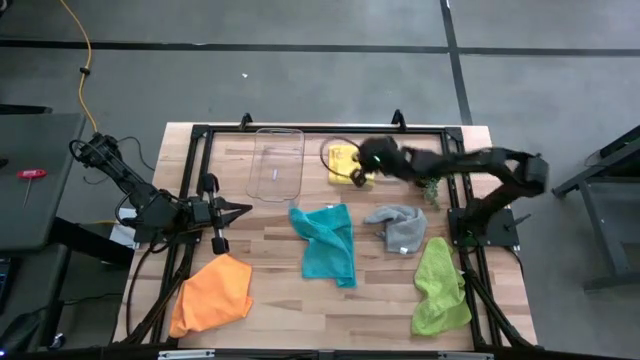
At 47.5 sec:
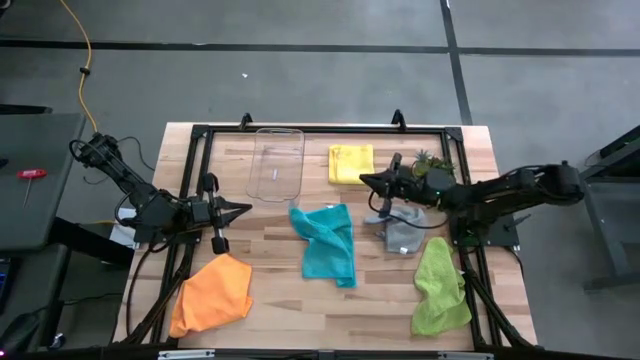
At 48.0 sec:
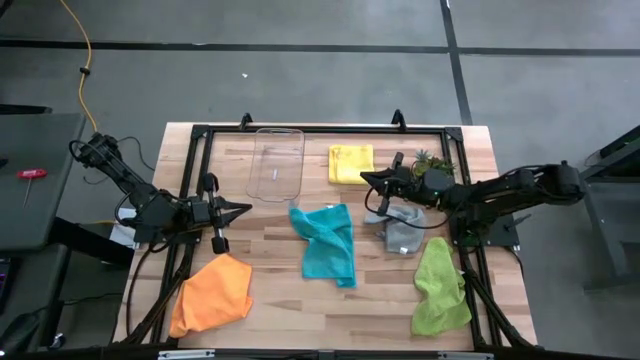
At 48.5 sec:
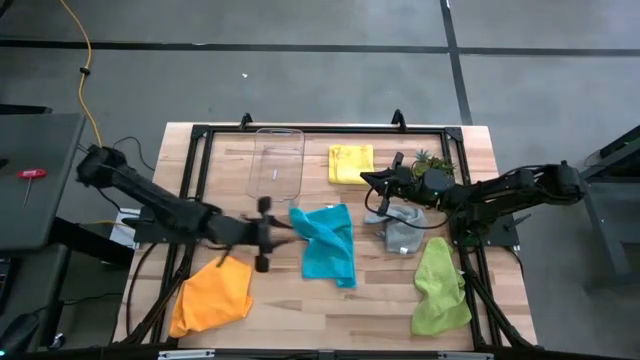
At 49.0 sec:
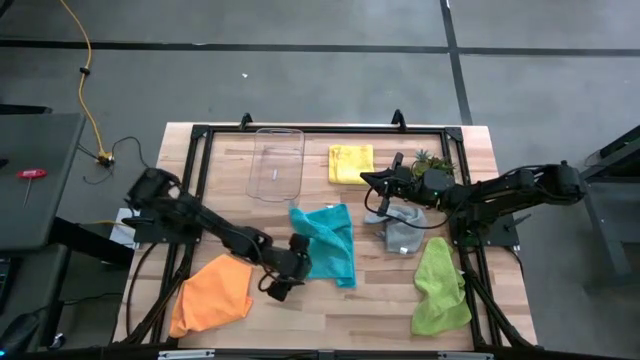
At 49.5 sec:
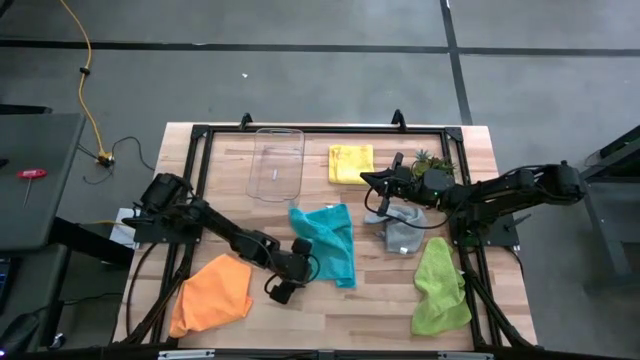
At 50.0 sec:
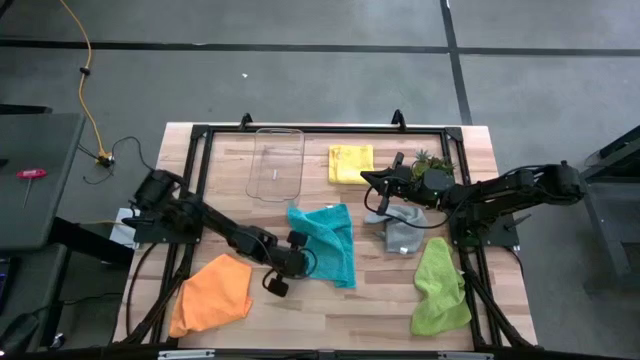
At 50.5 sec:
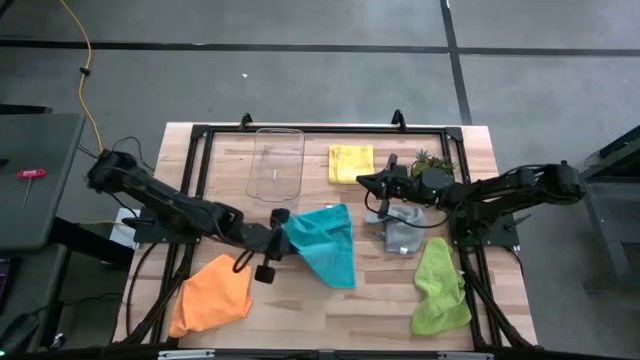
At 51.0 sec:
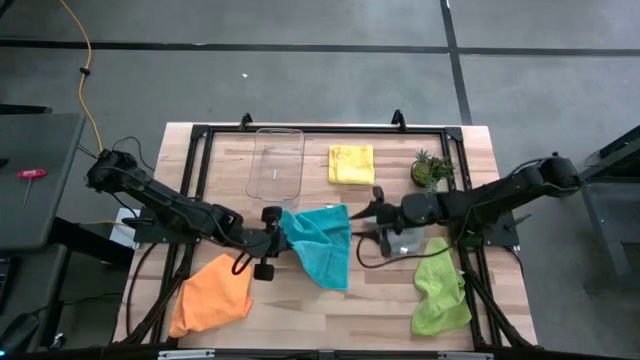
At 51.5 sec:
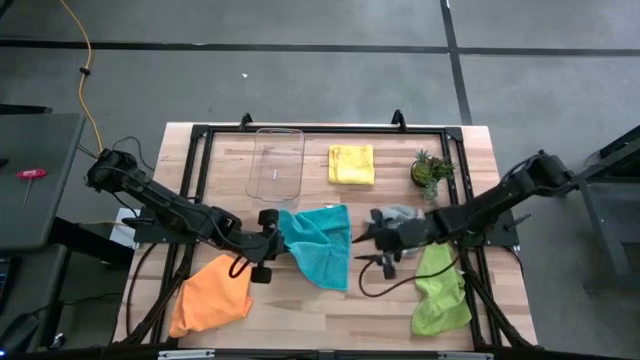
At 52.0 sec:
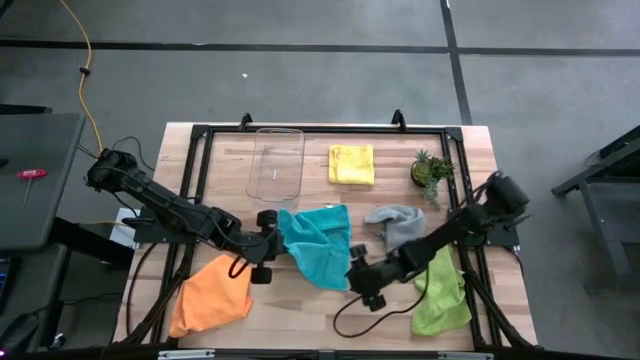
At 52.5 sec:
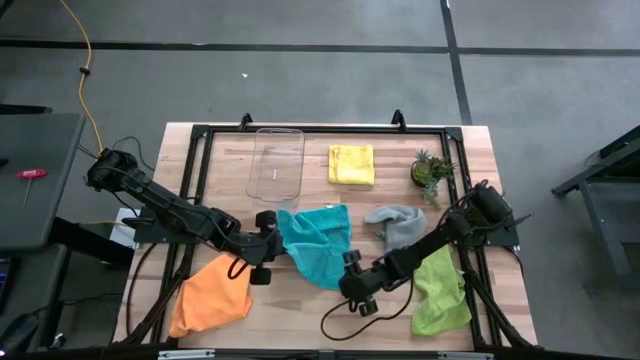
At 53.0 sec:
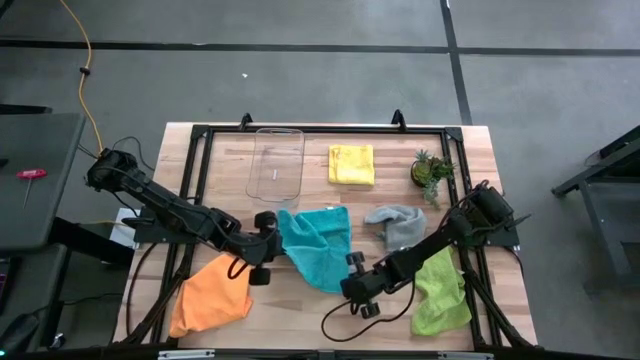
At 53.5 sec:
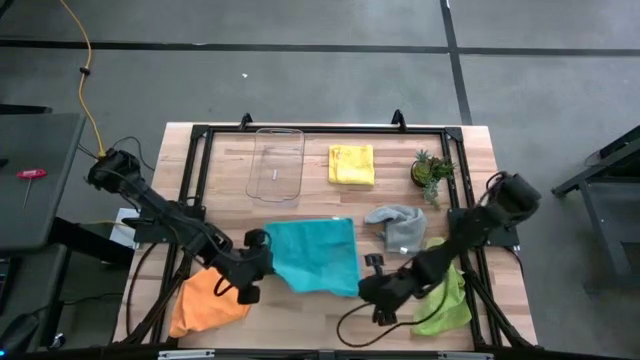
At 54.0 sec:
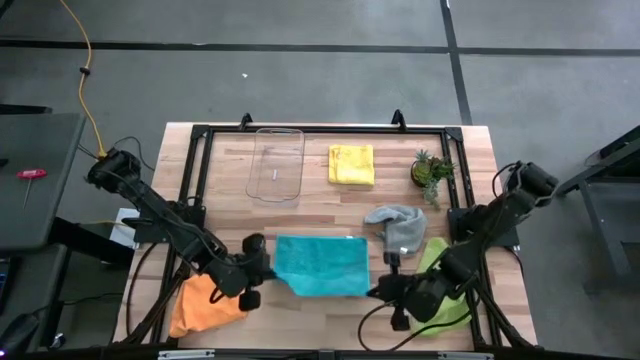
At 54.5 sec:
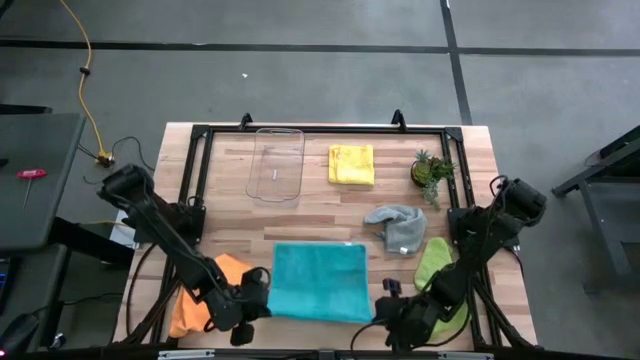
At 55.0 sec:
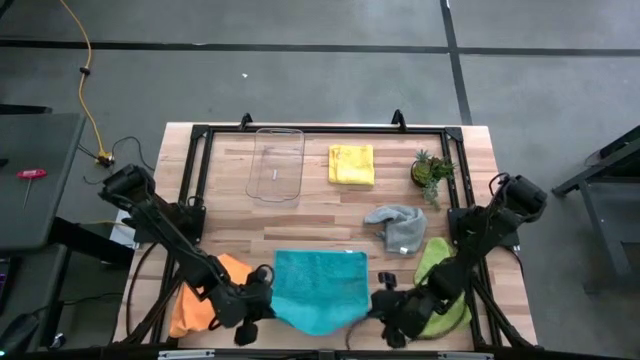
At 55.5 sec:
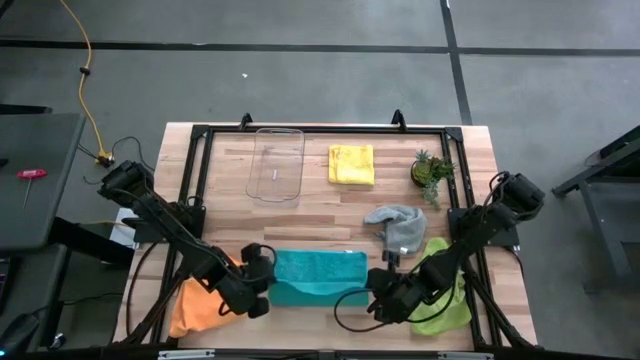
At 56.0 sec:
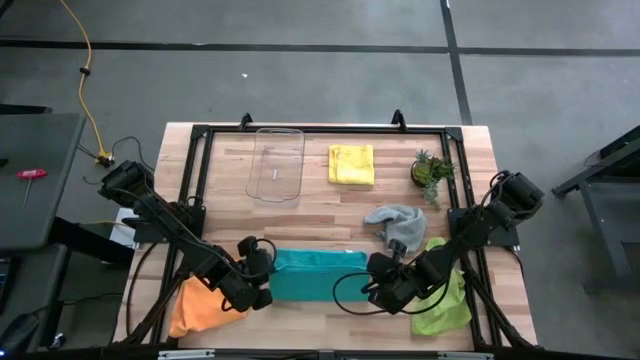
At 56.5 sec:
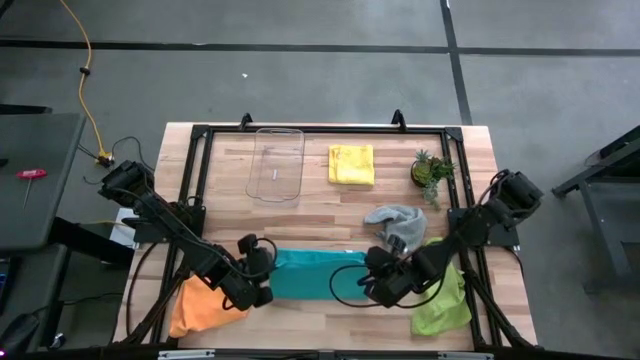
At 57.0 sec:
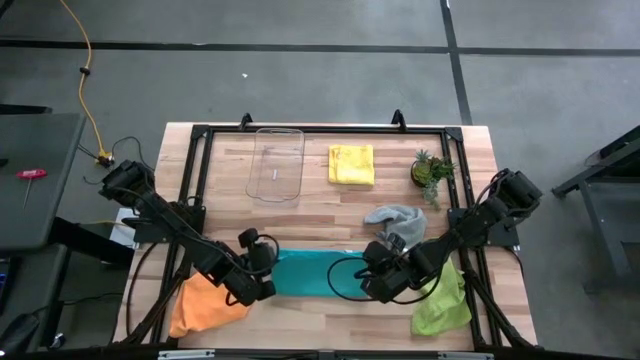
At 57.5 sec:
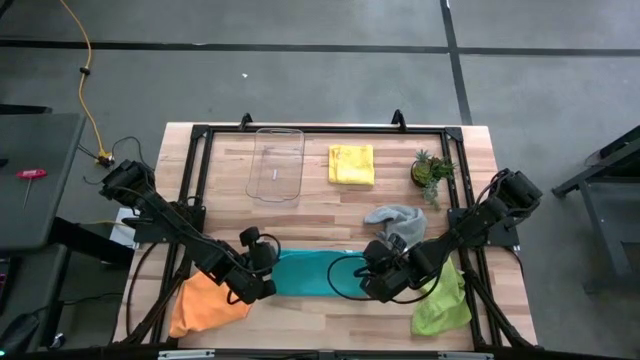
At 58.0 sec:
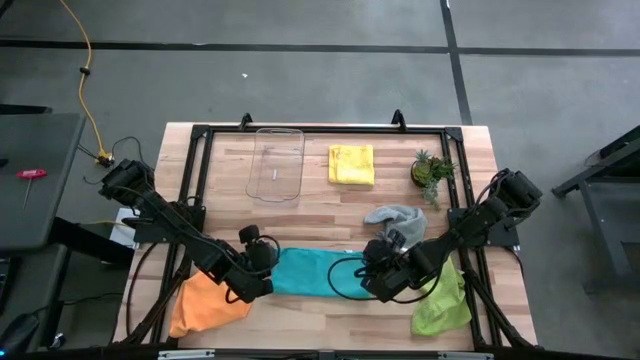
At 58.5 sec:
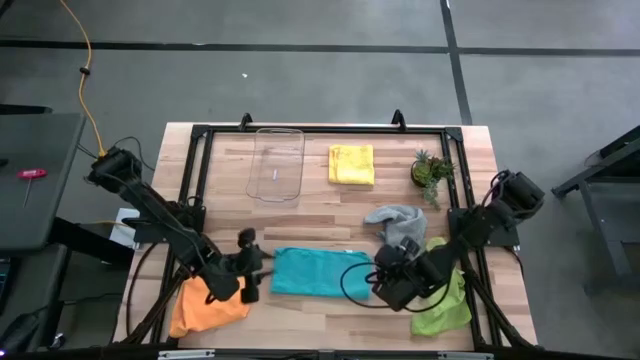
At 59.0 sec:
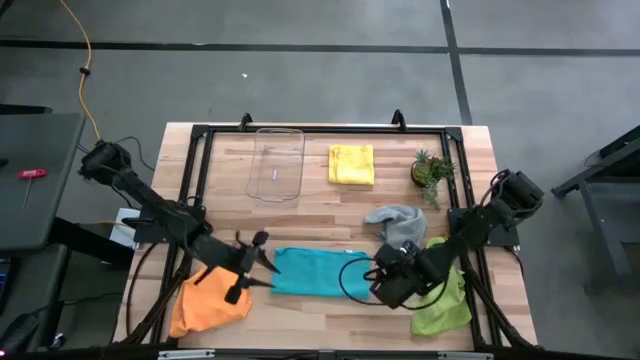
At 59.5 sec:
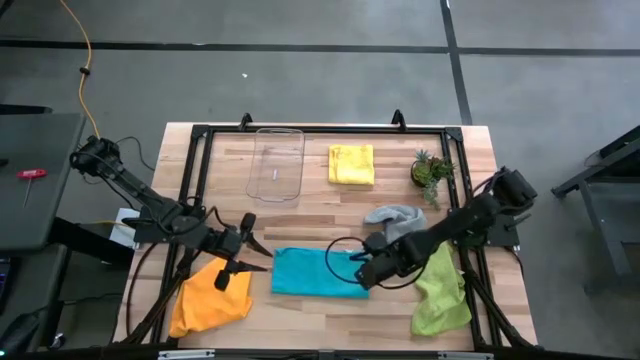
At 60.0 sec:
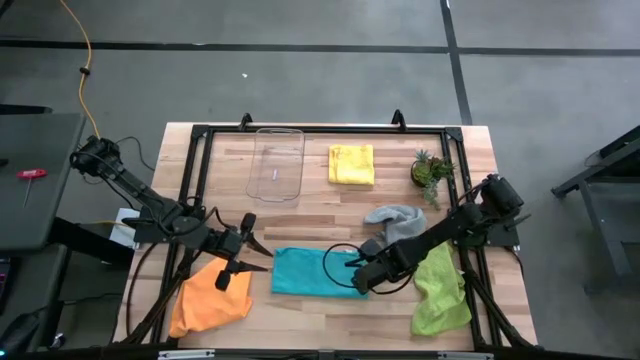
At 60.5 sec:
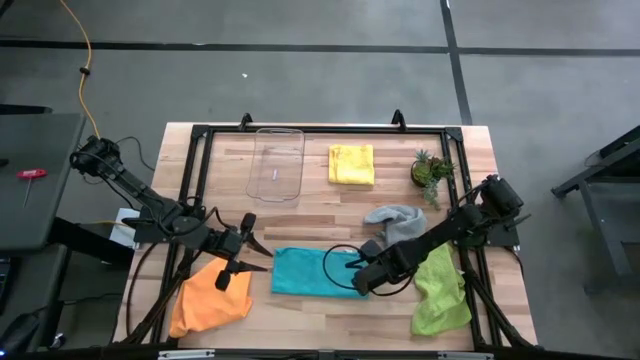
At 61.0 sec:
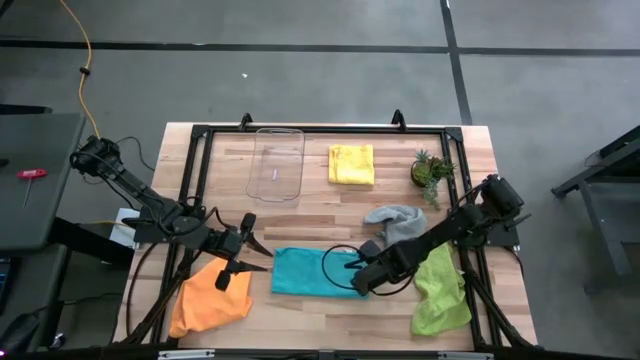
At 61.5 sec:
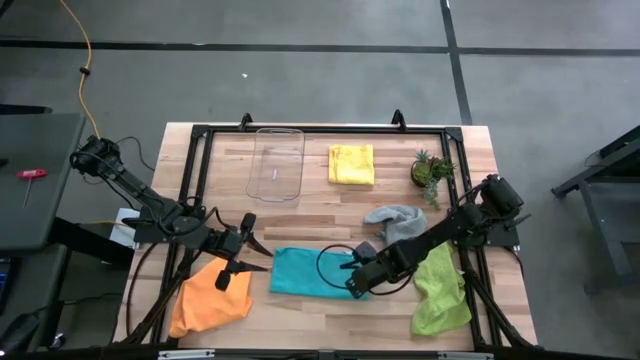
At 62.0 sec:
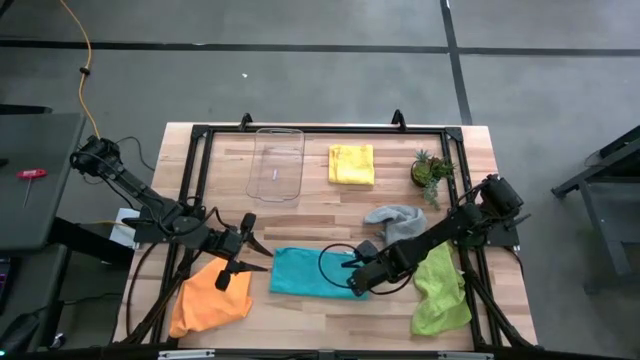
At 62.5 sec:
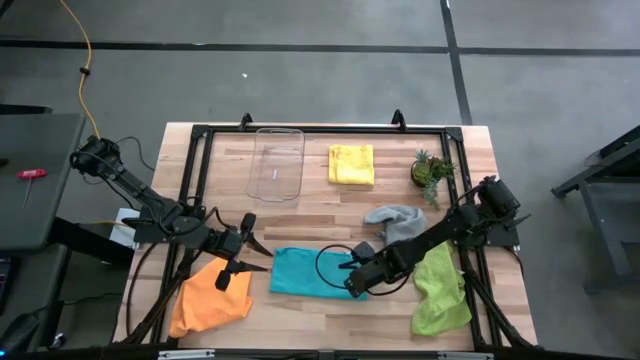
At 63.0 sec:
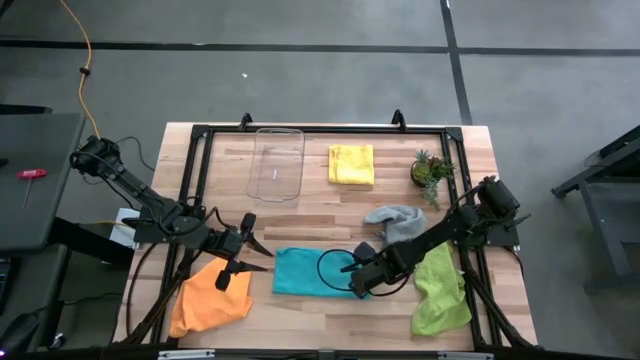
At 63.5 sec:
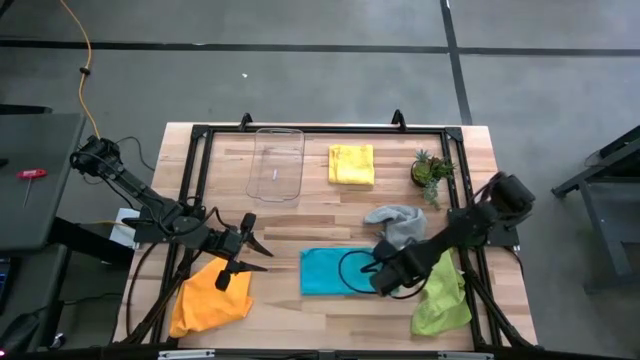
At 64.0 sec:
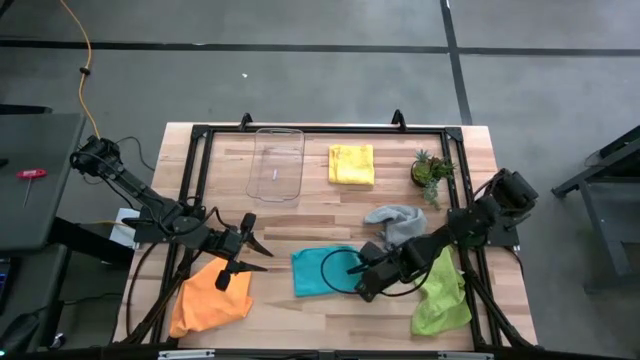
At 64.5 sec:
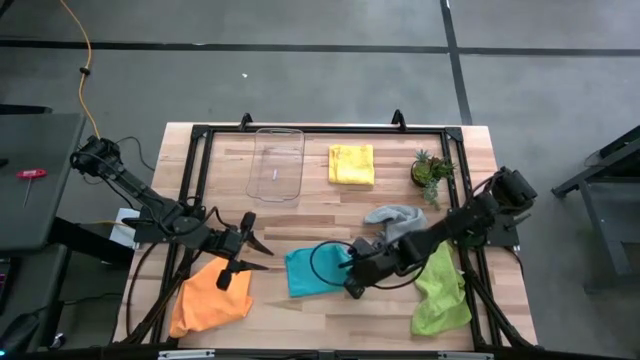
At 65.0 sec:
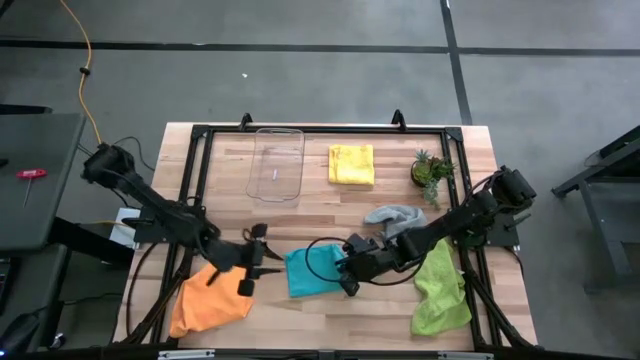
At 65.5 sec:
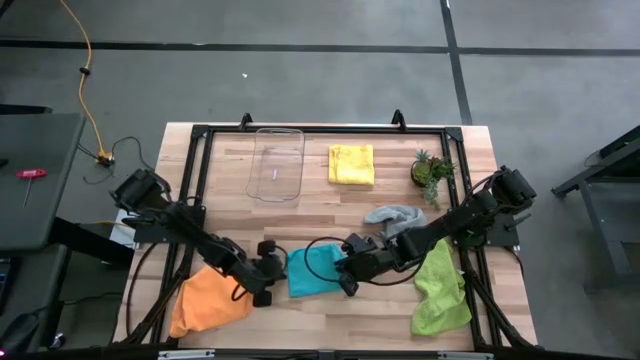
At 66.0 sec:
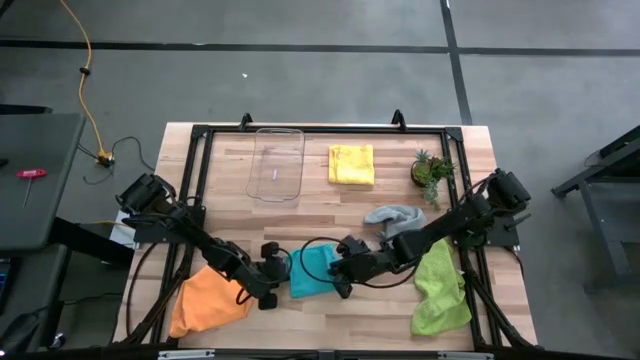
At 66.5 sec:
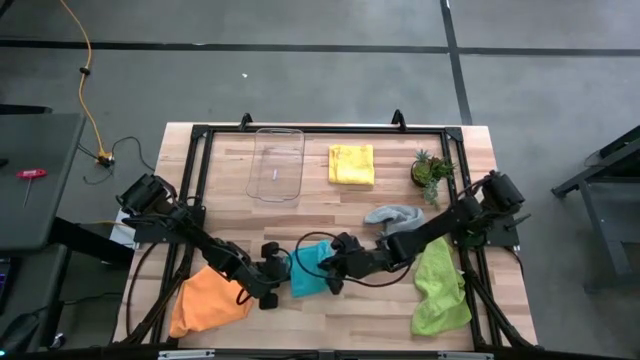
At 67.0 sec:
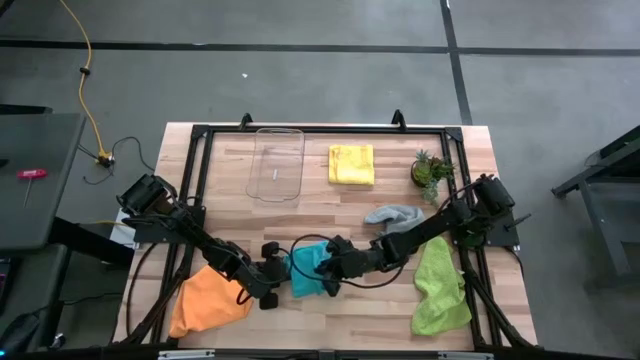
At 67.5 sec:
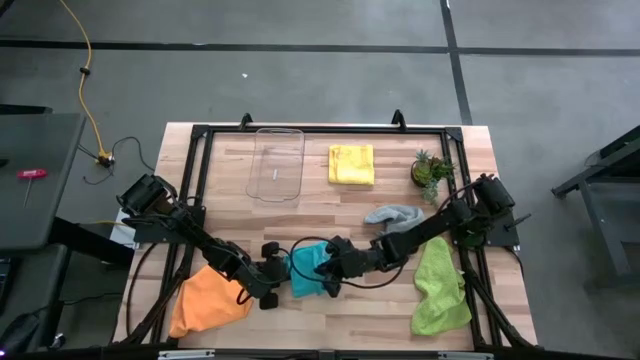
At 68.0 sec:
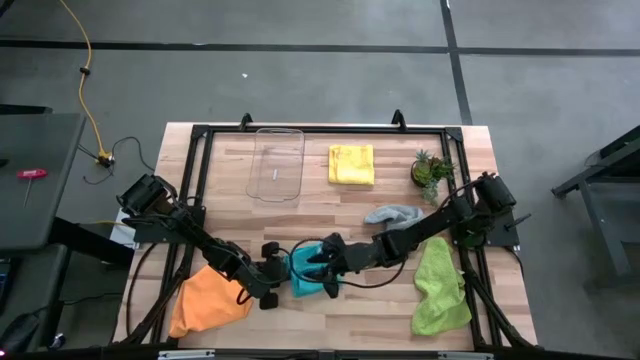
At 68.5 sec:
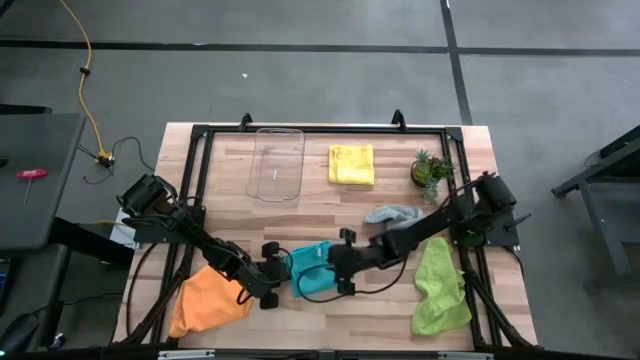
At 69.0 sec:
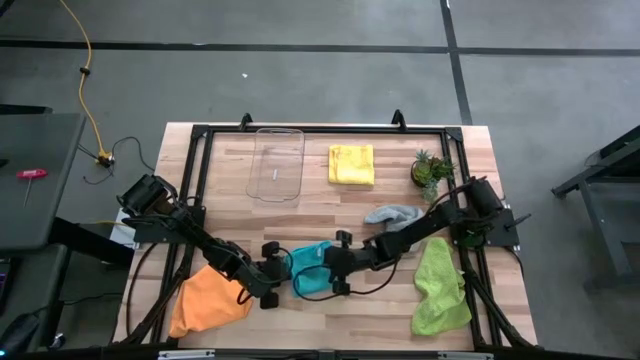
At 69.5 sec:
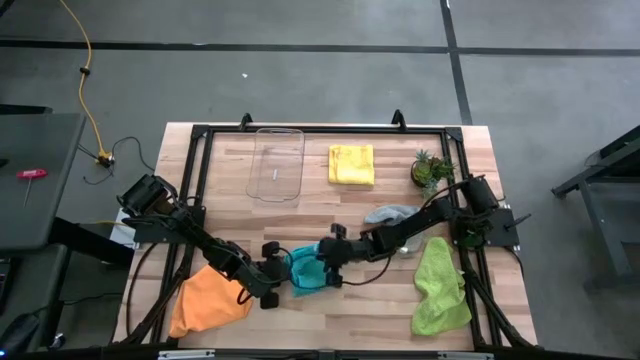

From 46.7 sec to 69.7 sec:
Task: Fold microfiber towels
Fold the blue microfiber cloth
